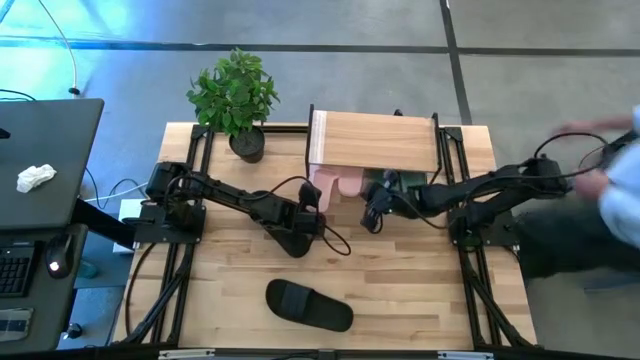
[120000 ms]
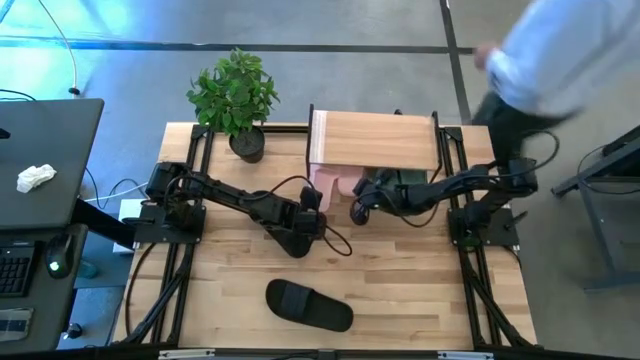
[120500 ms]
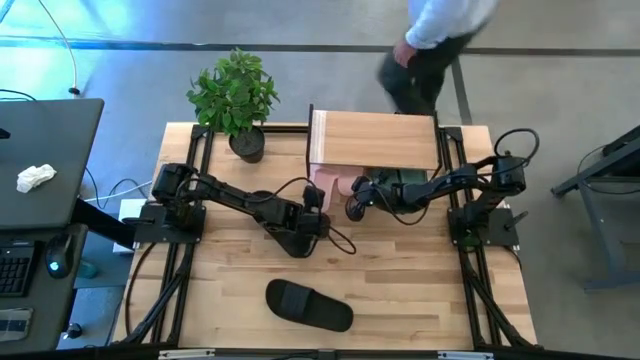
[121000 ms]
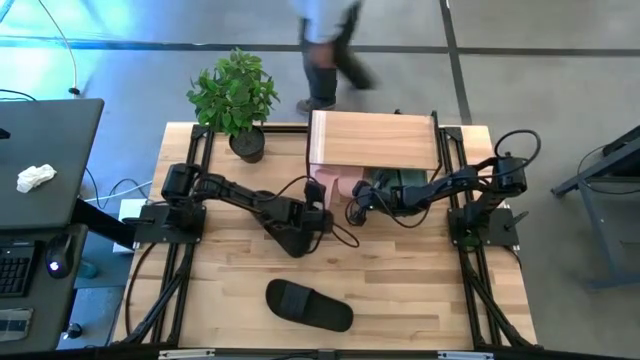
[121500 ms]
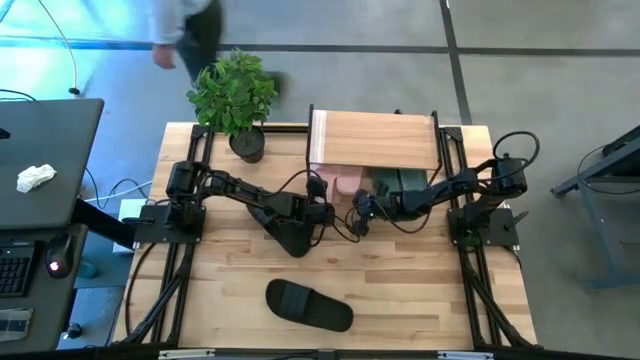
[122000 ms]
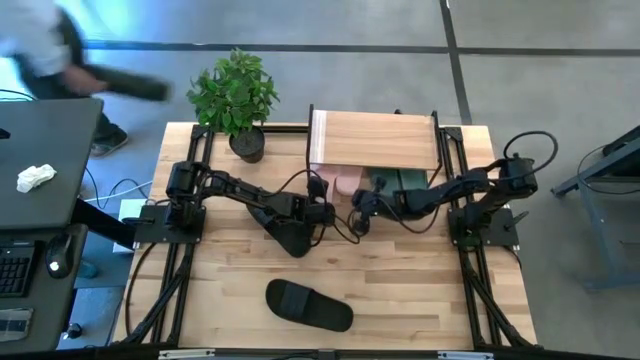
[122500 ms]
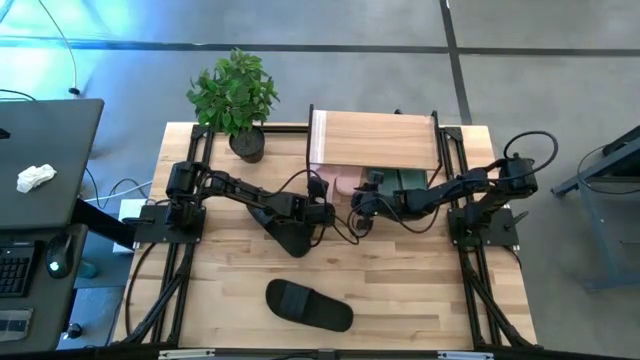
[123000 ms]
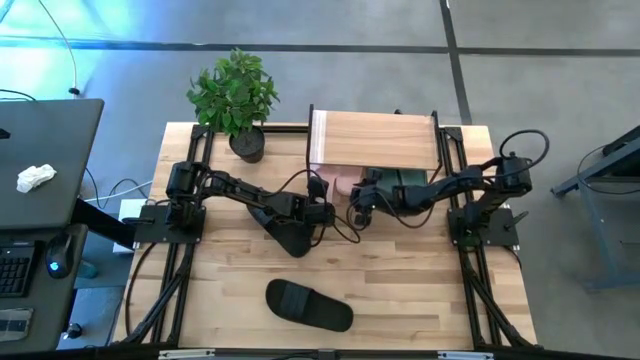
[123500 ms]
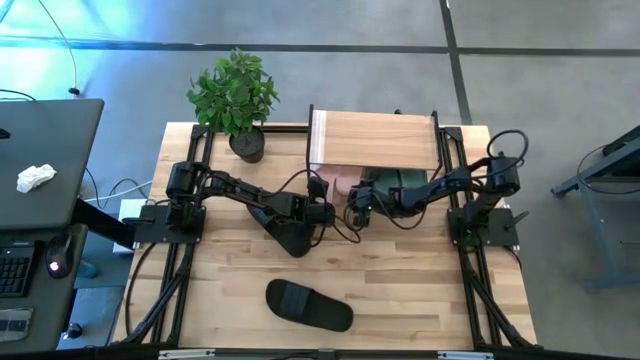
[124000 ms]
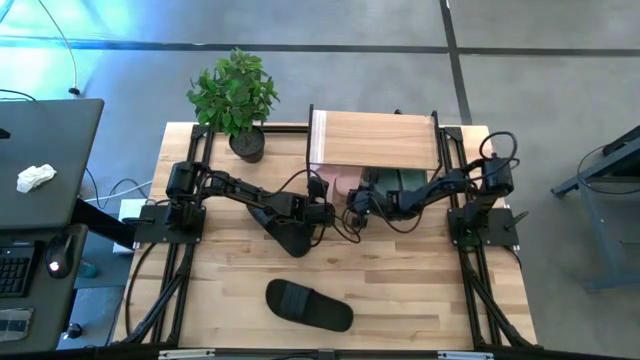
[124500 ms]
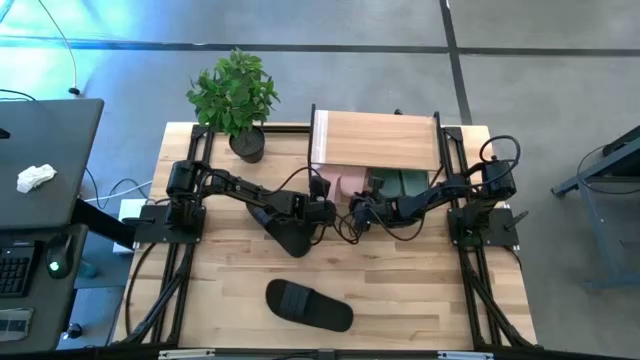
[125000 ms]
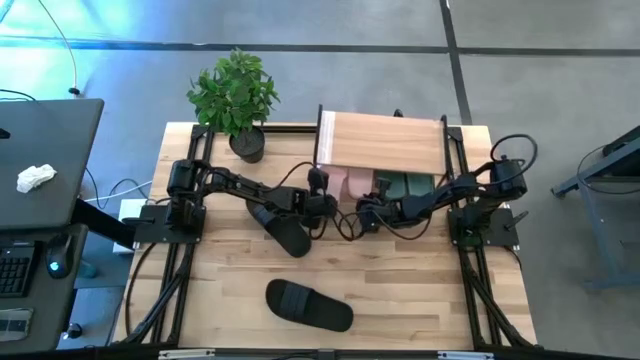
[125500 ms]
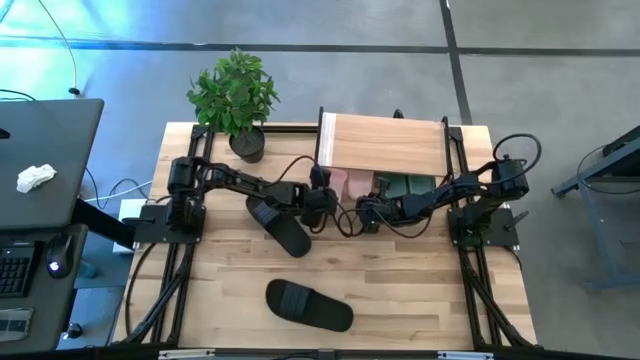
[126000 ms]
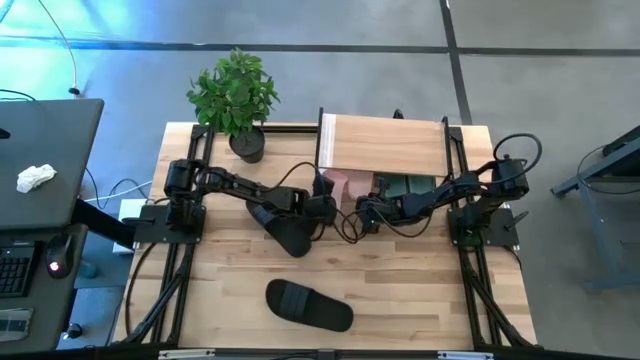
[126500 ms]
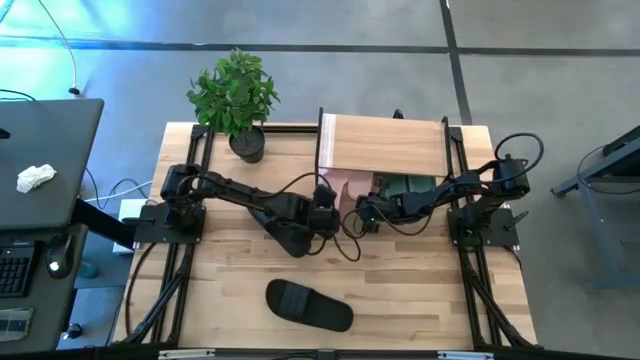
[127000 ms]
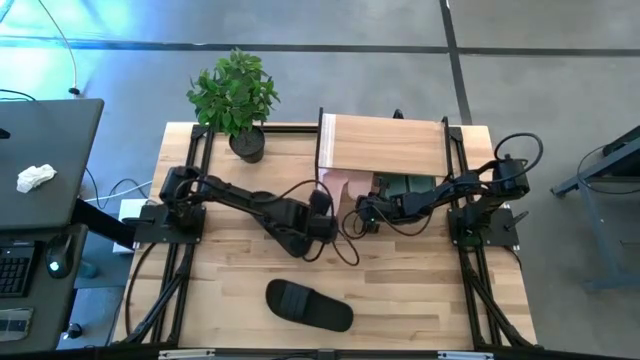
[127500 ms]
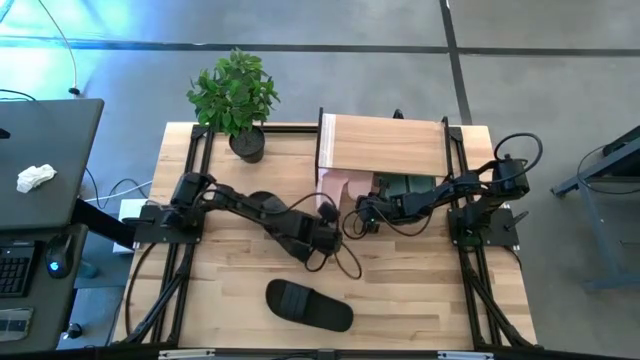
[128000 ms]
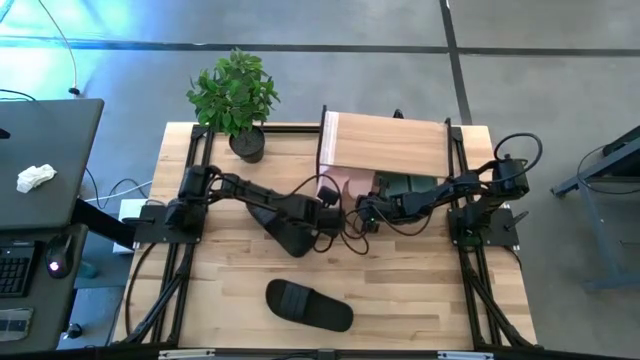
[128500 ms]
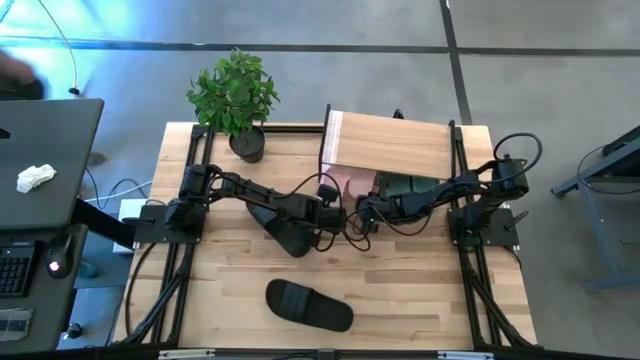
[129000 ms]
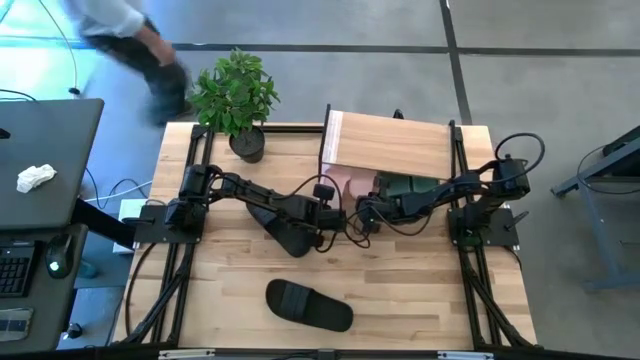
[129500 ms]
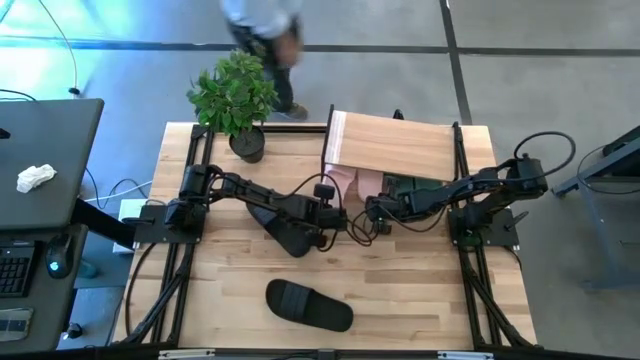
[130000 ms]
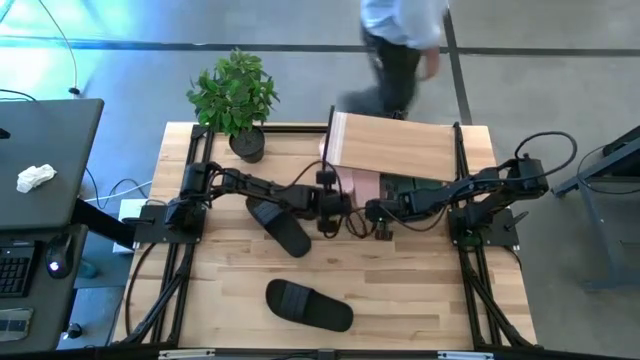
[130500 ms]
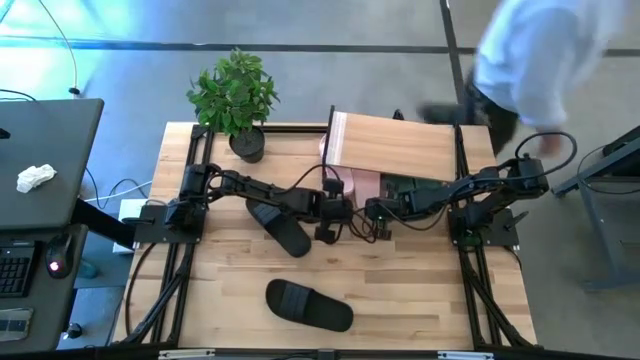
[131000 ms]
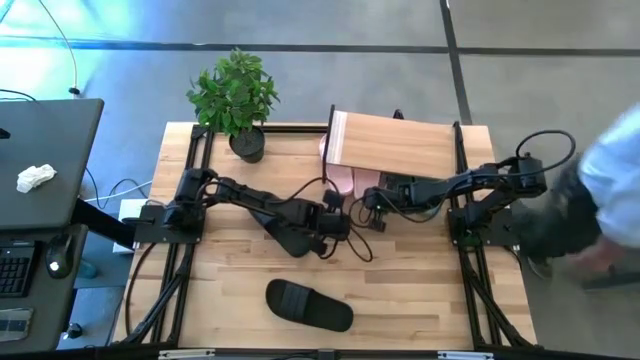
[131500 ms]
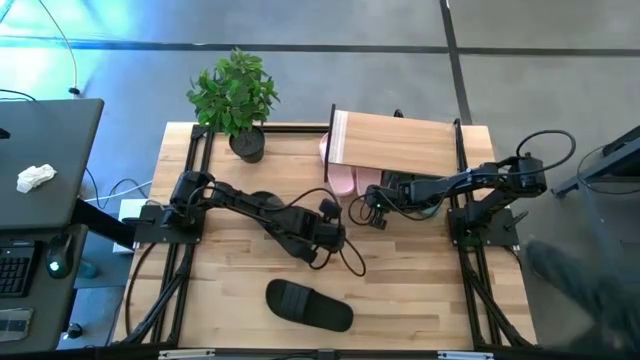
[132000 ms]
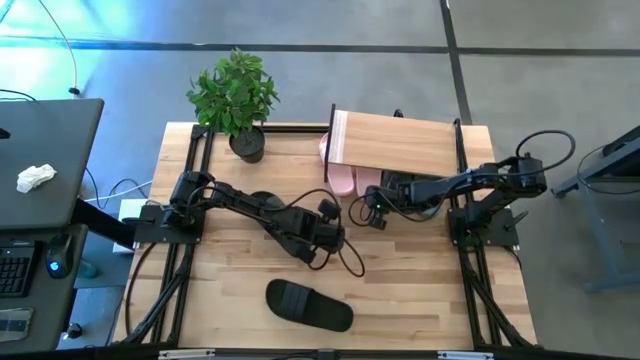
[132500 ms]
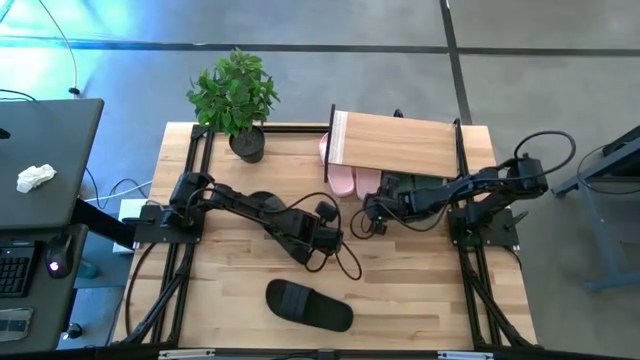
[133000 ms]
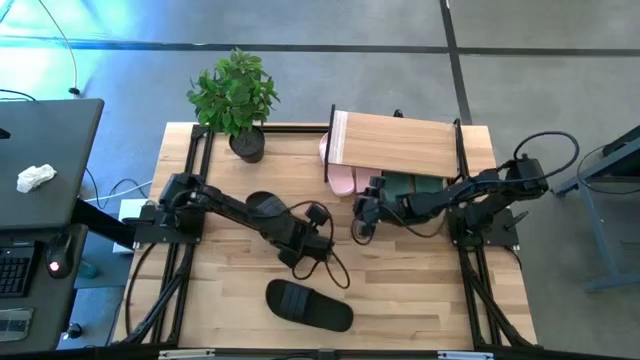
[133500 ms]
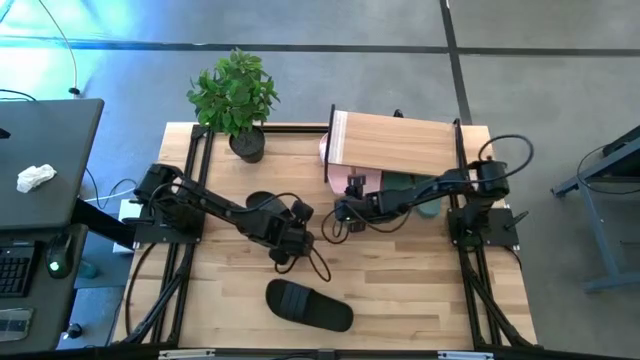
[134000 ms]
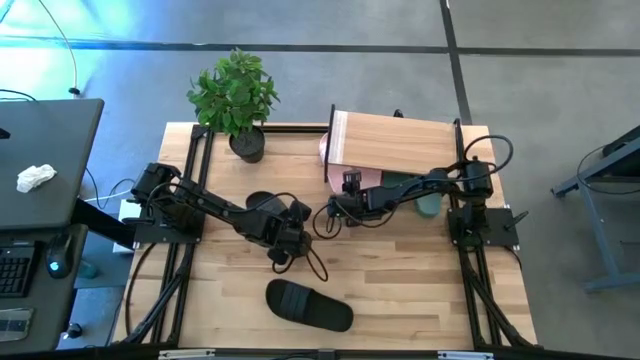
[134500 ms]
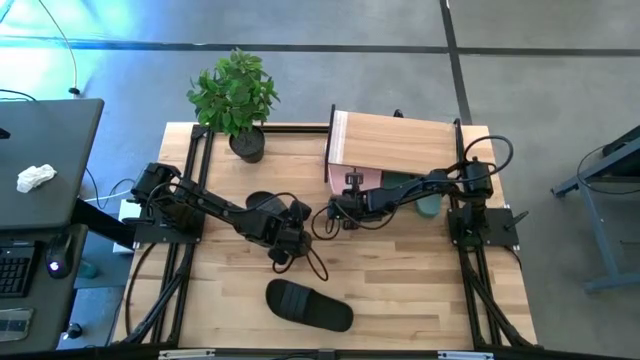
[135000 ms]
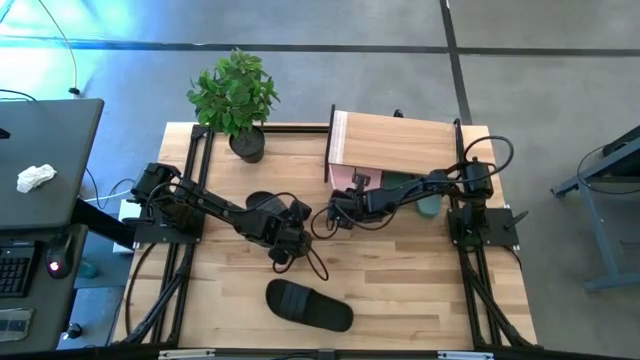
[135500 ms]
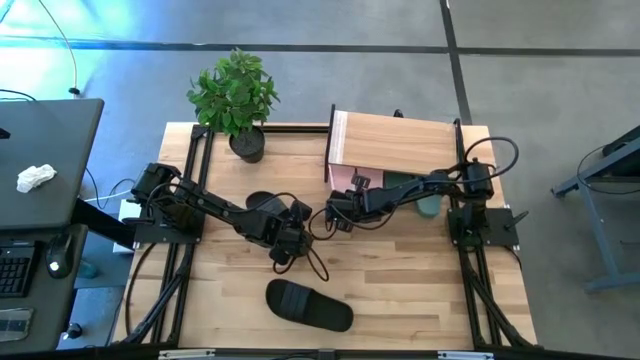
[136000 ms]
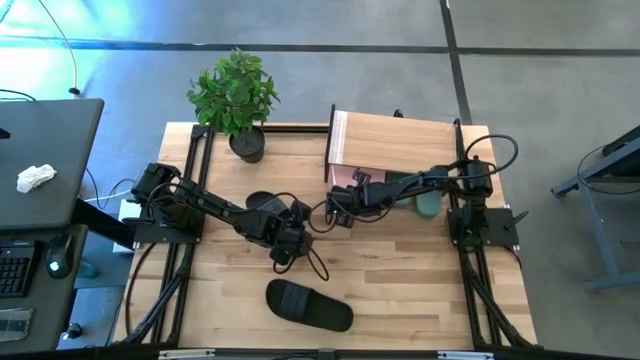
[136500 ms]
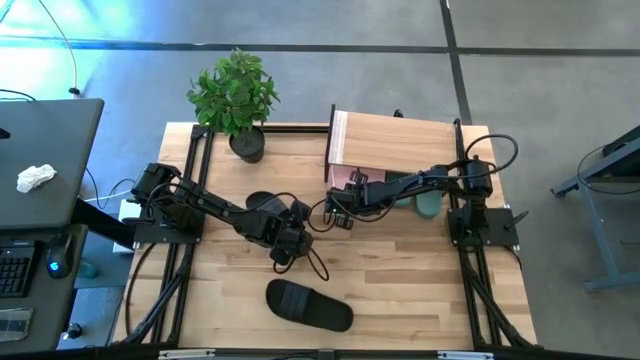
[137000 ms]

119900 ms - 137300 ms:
Task: Pick and place slides into the shelf
Adjust the pink slides under the shelf

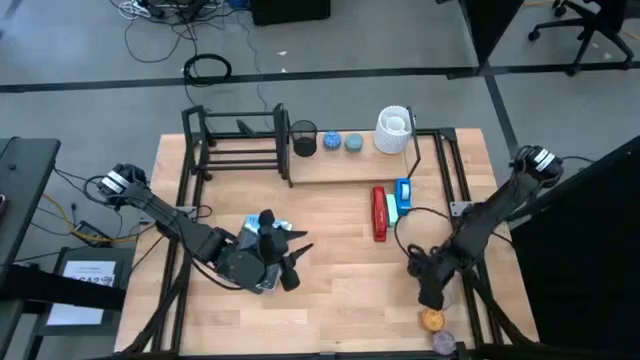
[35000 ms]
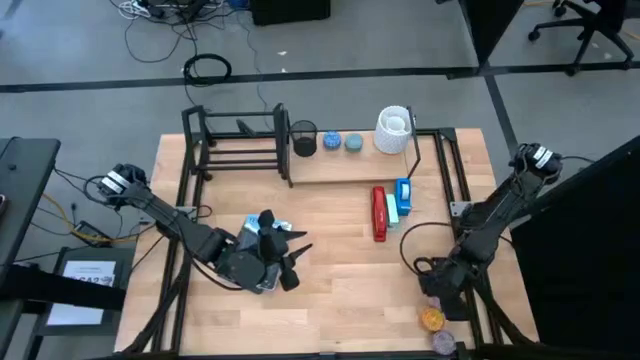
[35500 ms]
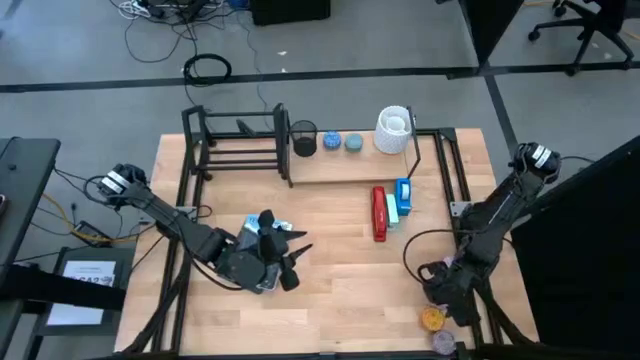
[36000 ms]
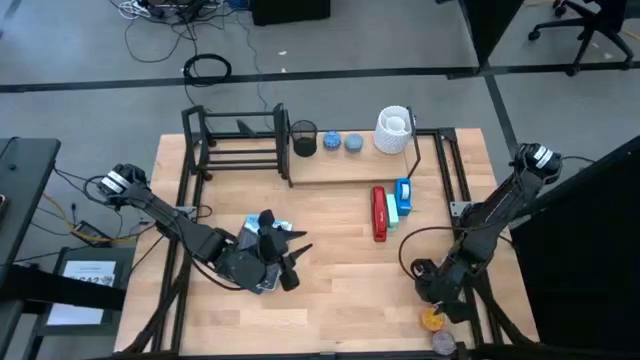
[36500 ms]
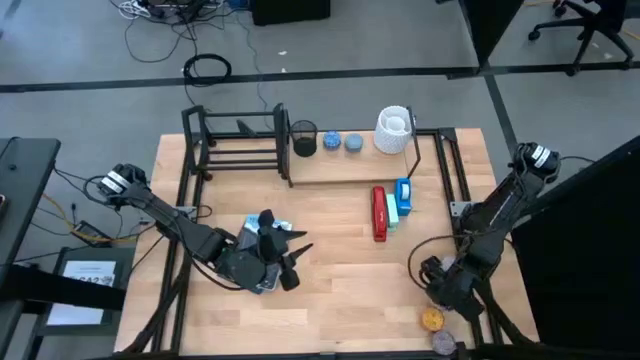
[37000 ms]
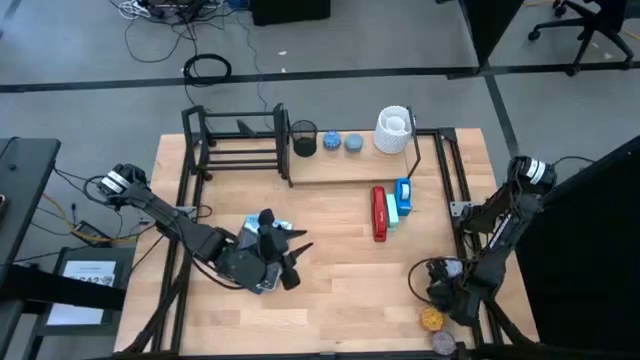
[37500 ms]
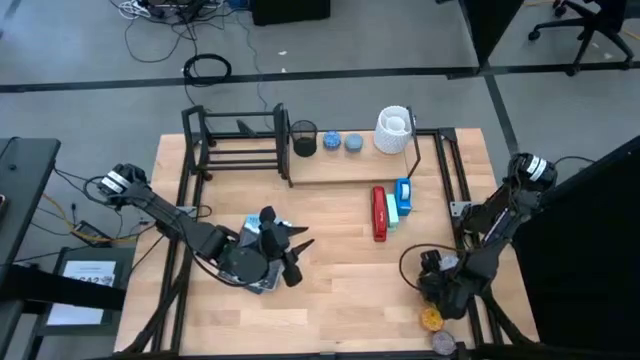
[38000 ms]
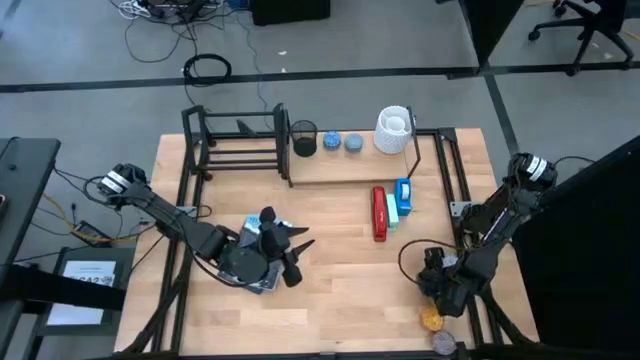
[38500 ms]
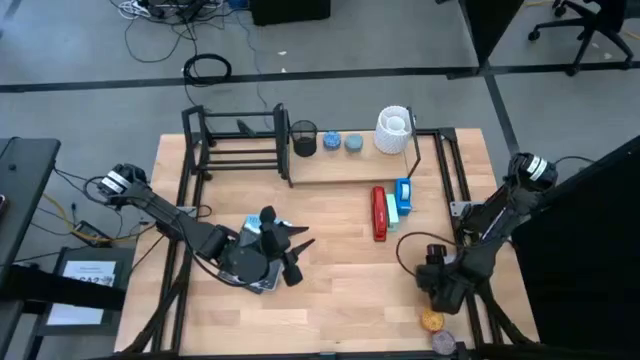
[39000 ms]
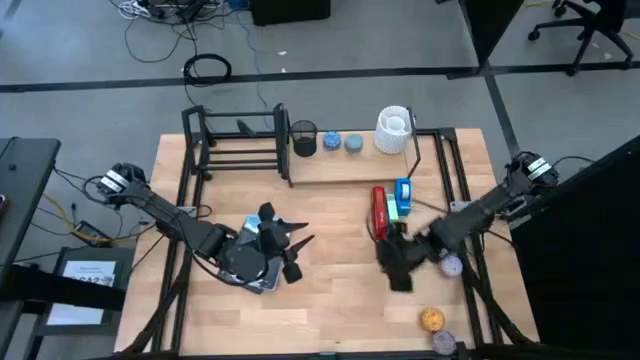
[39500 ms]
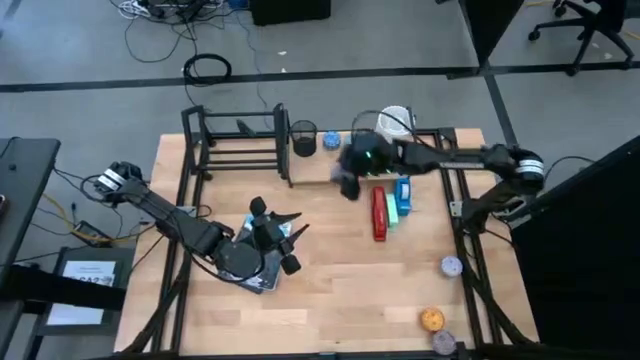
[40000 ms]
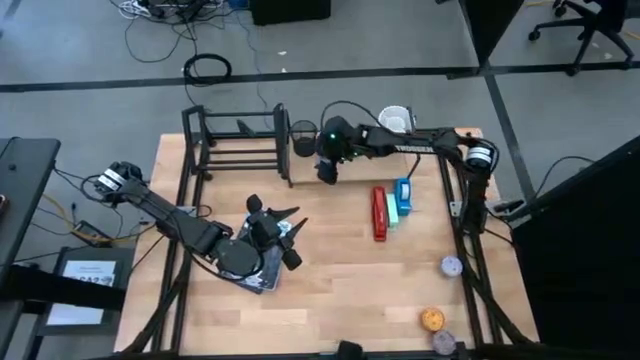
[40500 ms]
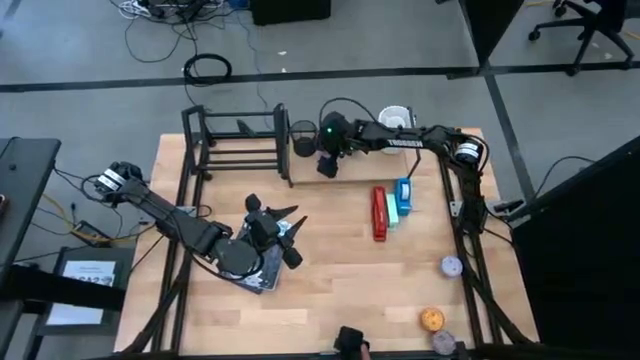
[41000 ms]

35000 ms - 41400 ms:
Task: Stock shelves
Put the light purple scented candle on the shelf
